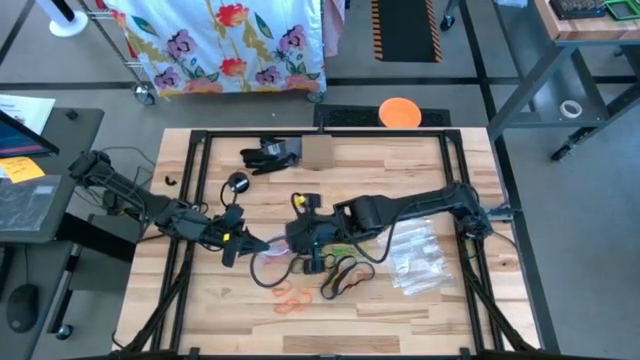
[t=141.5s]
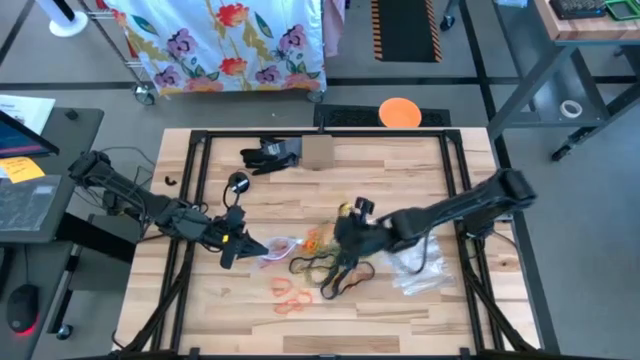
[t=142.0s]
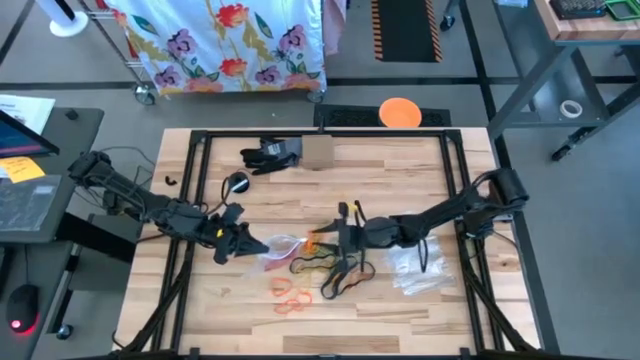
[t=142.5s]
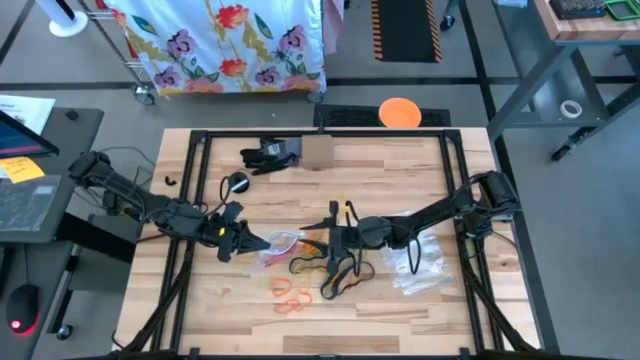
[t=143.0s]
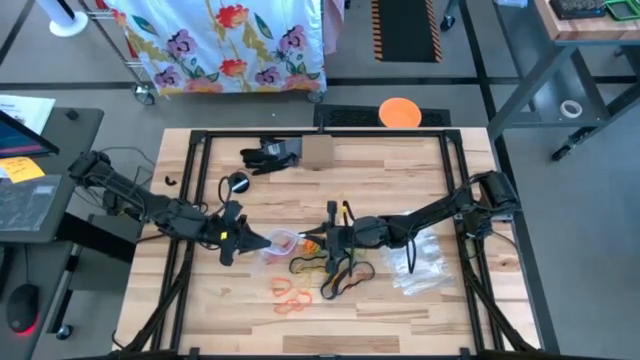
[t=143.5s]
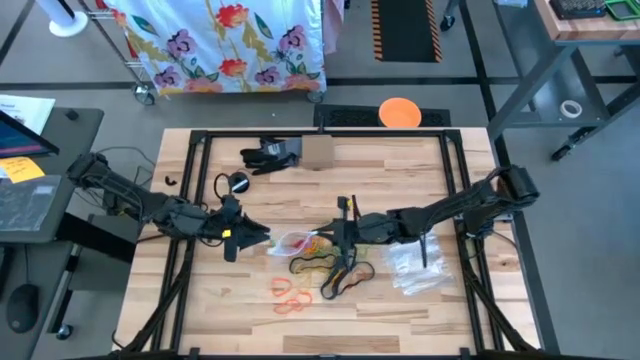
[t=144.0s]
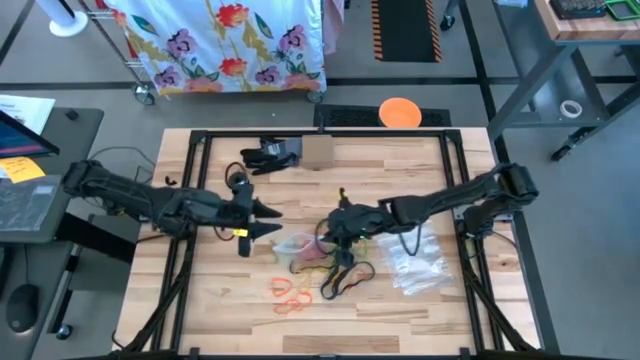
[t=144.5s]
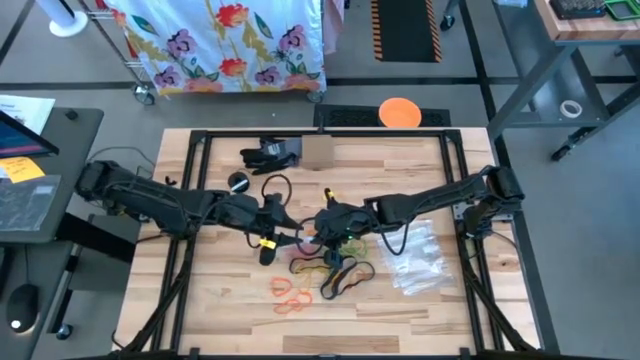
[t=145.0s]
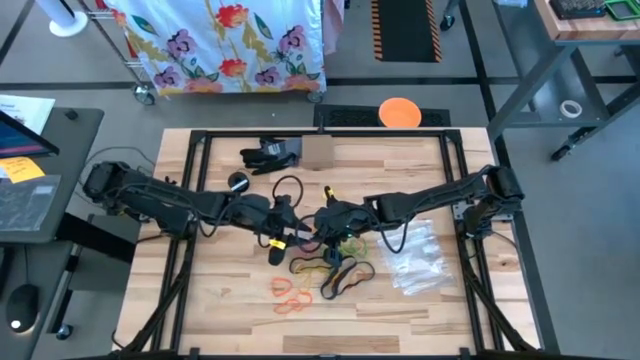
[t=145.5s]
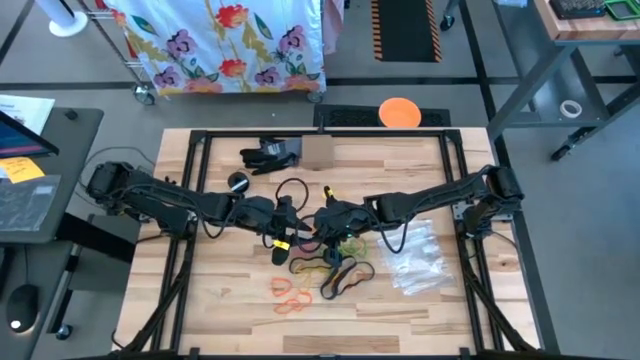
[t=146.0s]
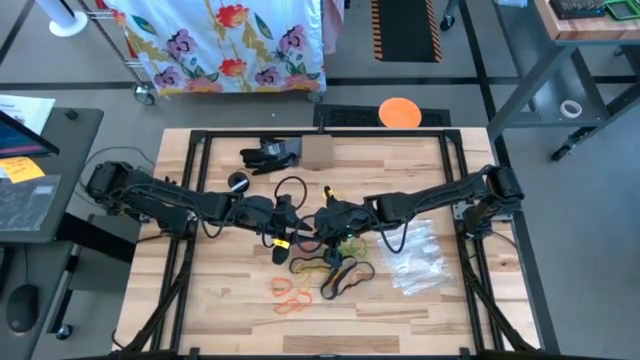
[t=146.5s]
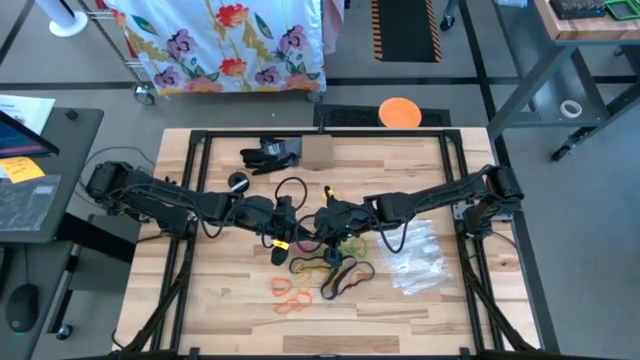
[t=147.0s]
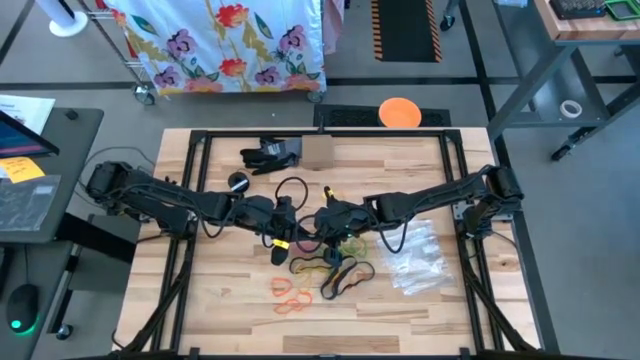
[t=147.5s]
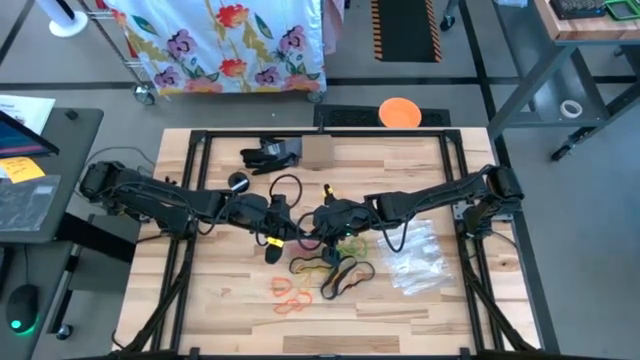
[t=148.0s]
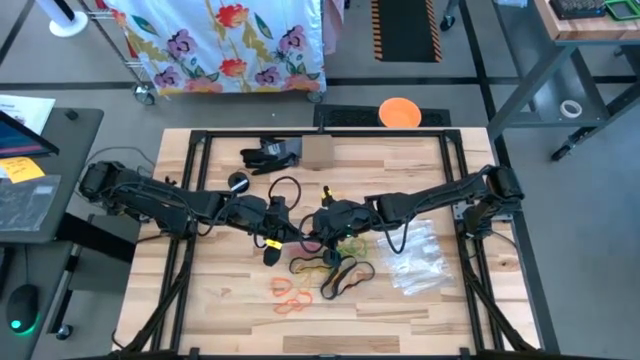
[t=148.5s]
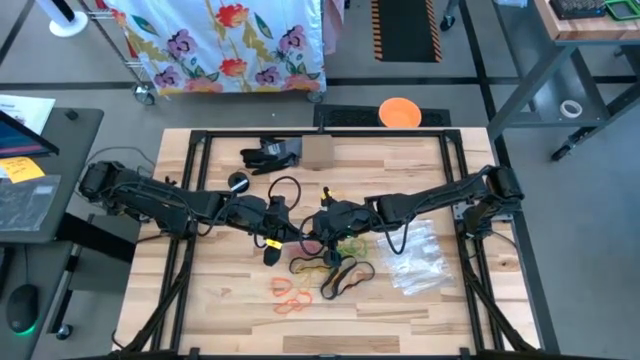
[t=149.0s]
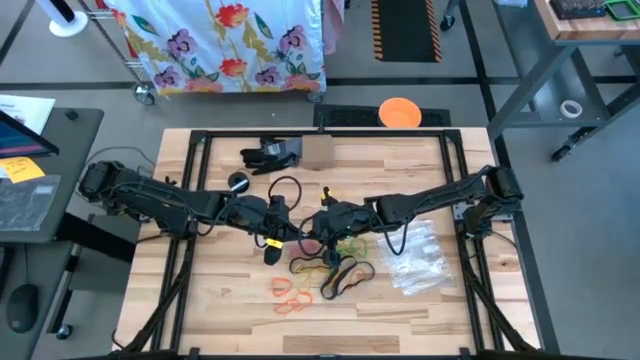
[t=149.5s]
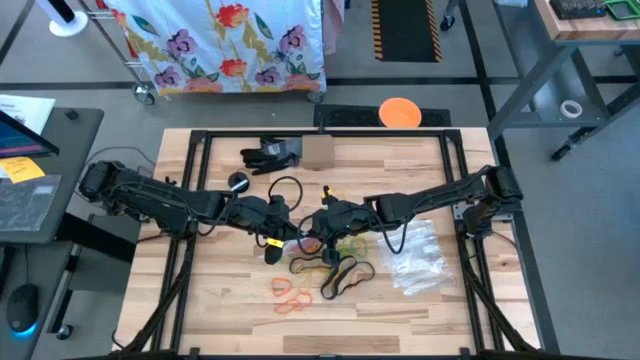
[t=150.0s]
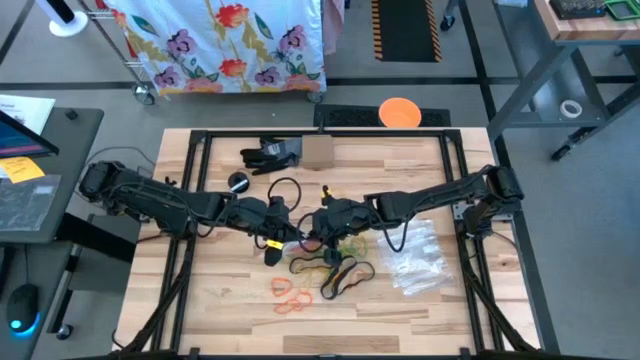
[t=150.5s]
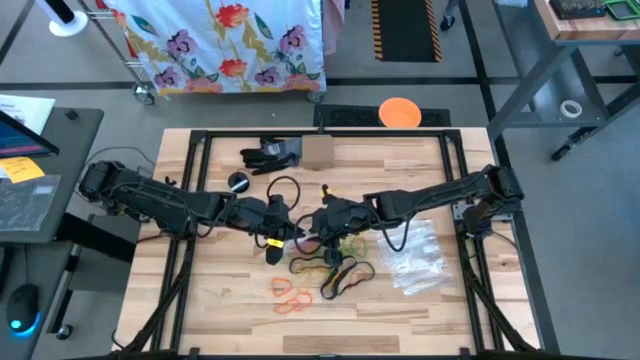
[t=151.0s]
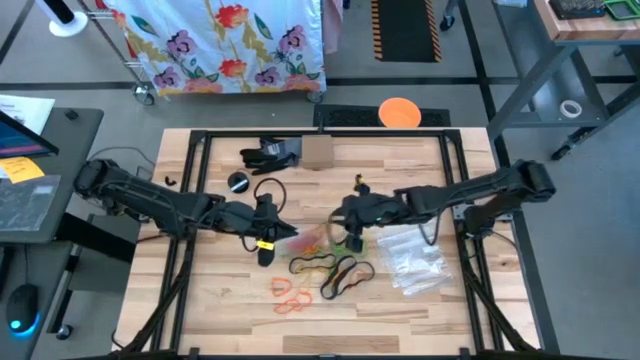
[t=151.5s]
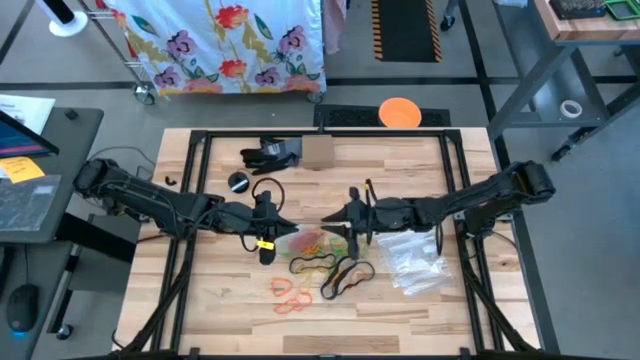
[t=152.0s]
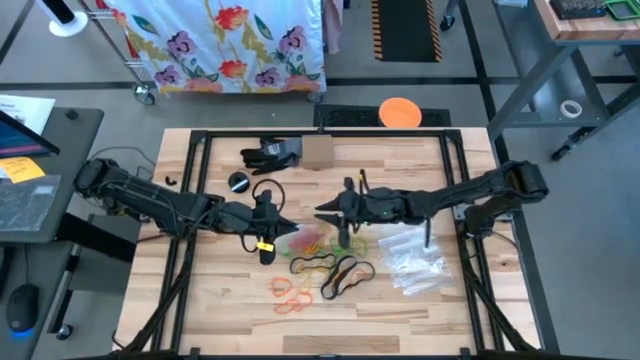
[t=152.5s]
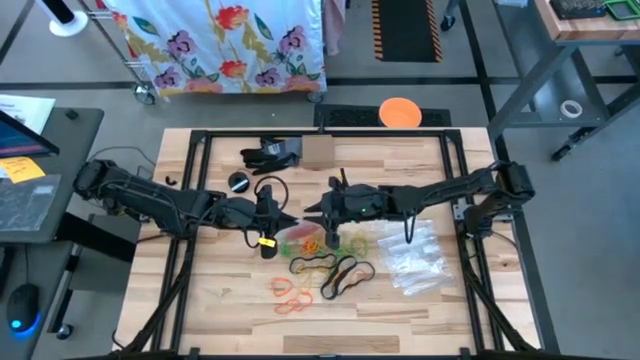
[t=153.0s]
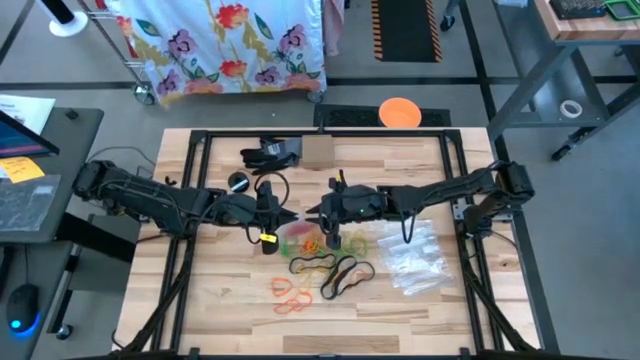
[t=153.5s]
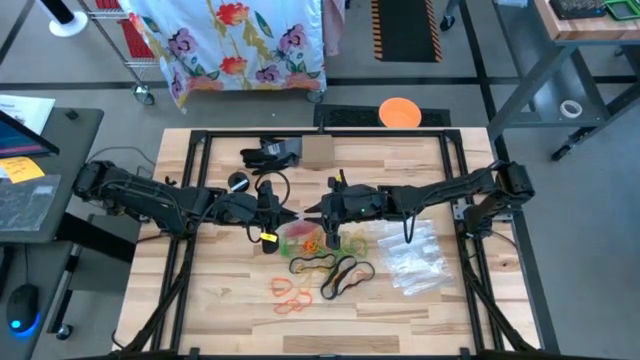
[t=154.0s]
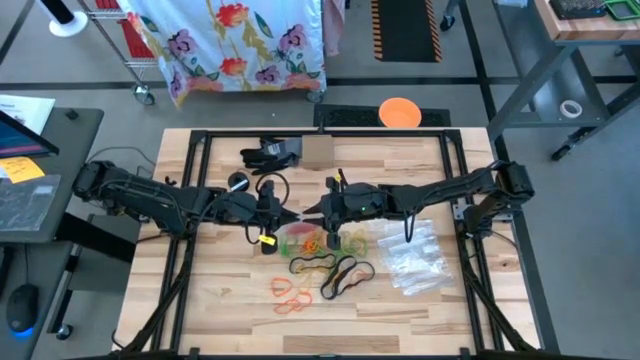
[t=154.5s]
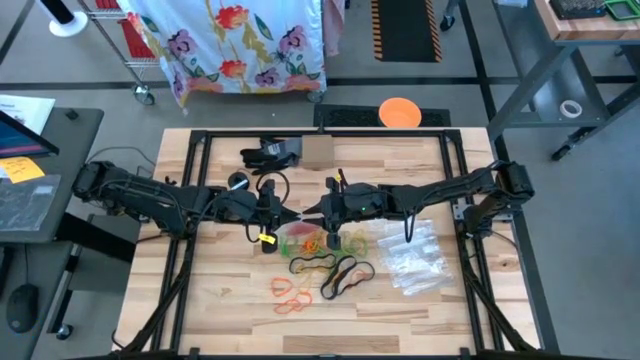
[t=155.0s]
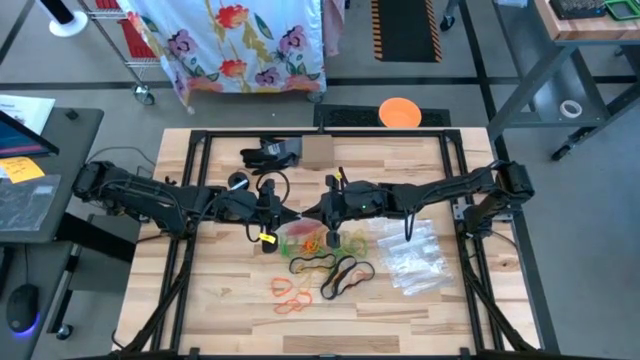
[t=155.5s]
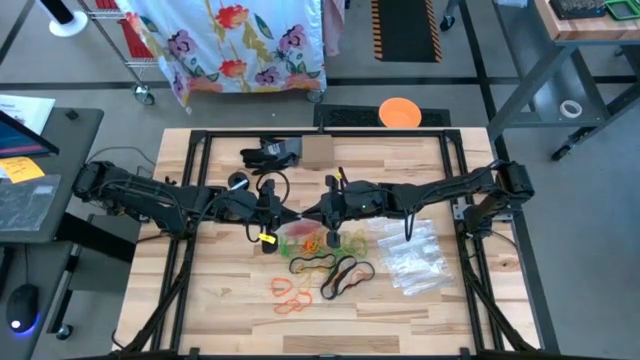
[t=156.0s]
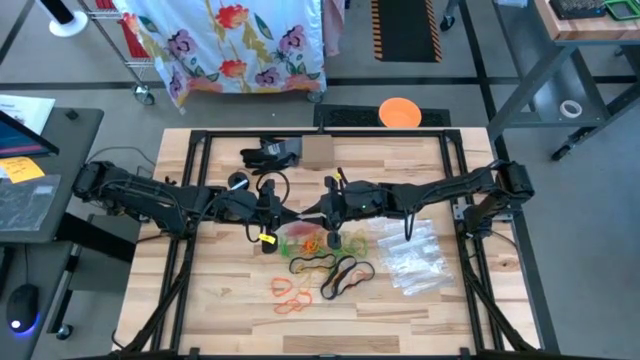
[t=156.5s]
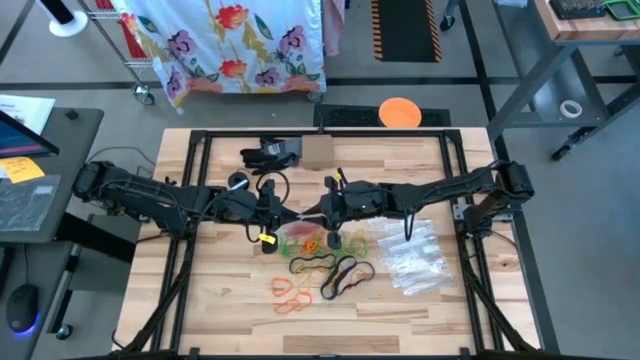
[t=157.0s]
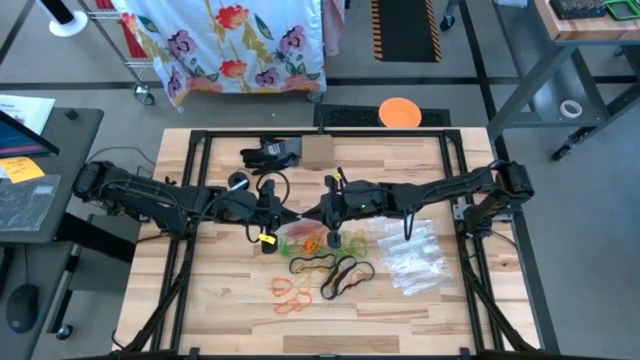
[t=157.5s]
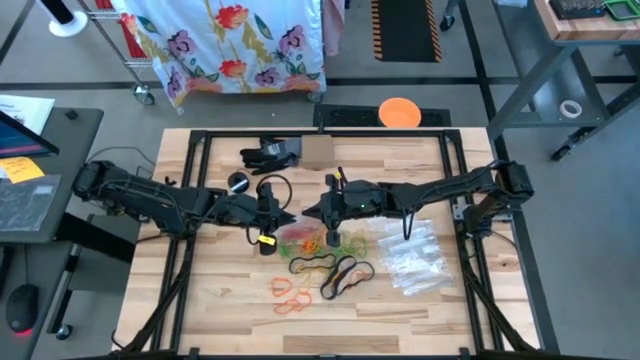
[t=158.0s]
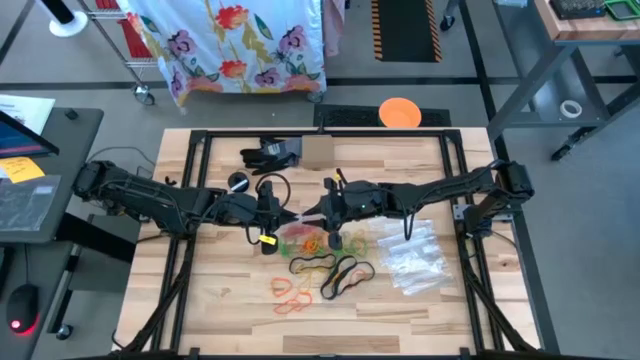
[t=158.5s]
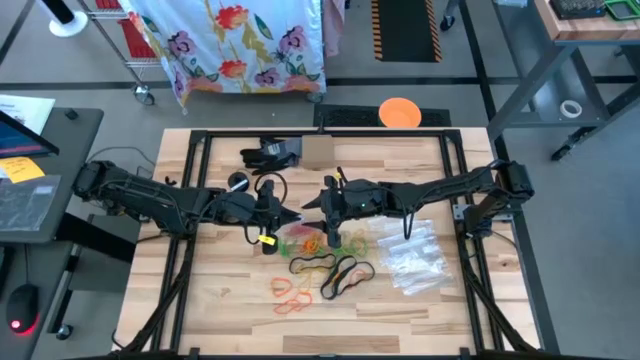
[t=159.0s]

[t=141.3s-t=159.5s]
Task: Sort rubber bands
Close the transparent zip bag

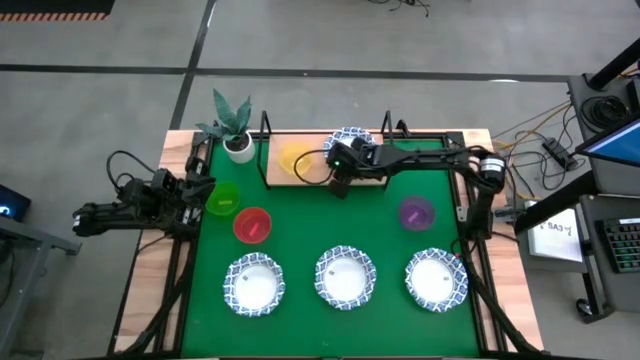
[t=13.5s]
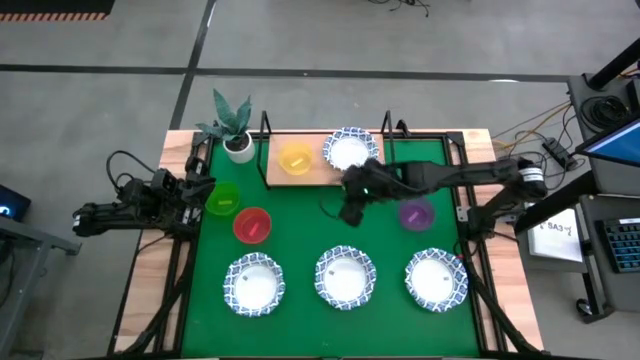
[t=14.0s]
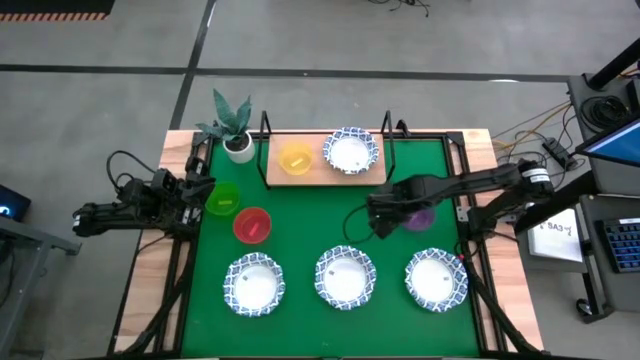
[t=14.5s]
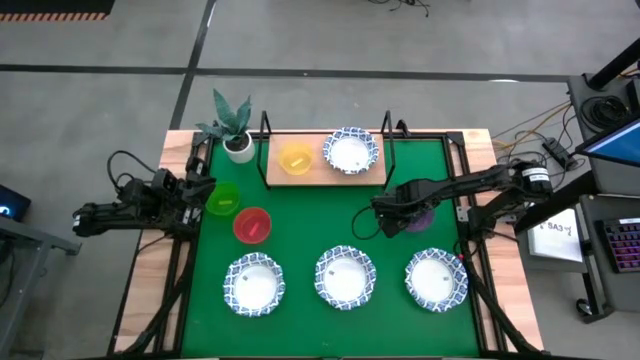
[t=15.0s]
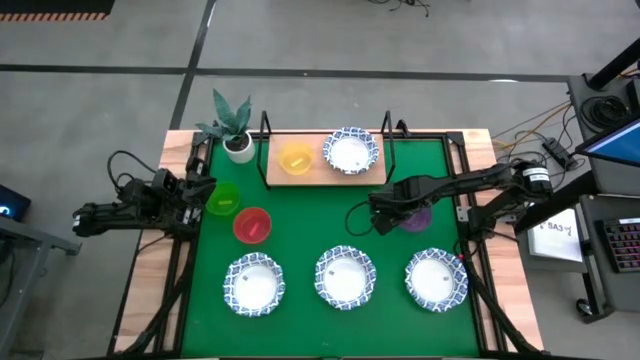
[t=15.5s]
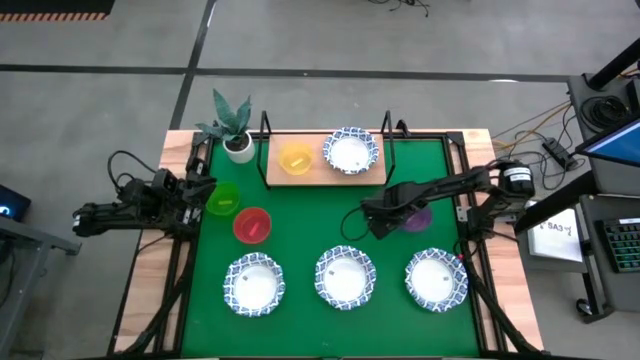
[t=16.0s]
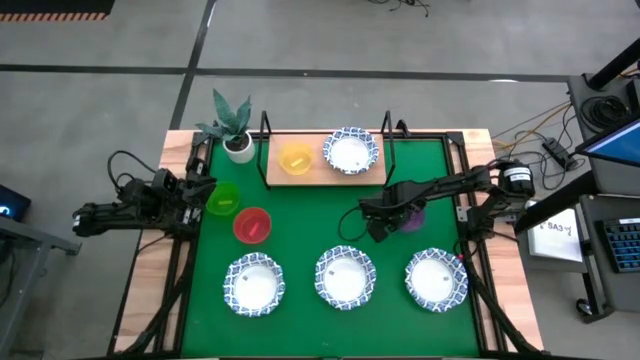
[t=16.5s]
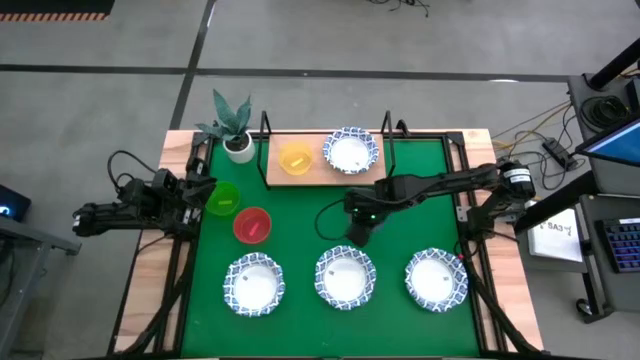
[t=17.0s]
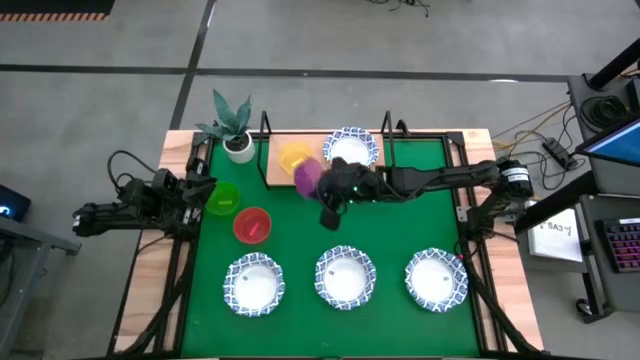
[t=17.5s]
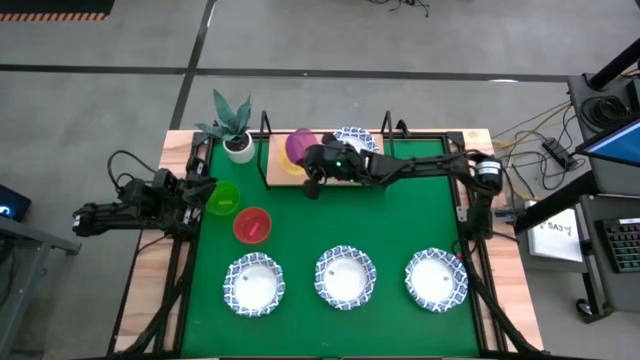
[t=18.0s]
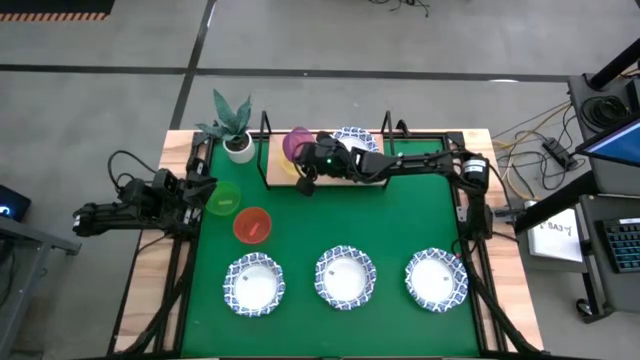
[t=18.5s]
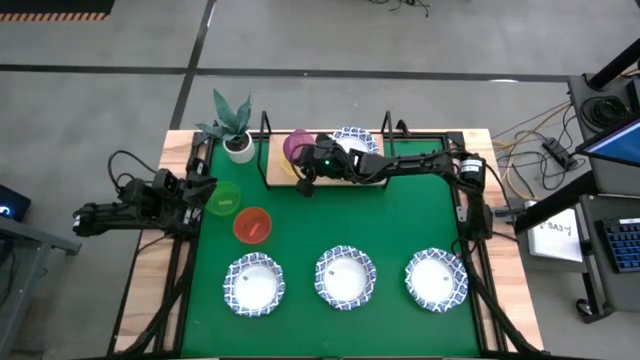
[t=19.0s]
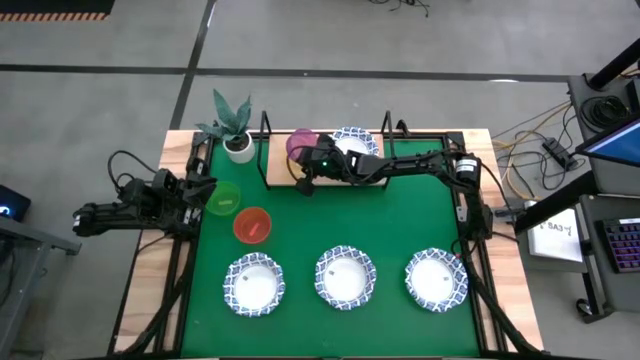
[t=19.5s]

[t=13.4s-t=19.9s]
Task: Place and stack bowls onto a shelf
Stack the transparent violet bowl on top of the transparent yellow bowl on the shelf
